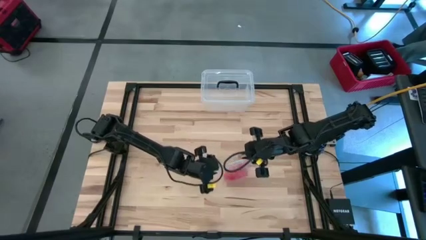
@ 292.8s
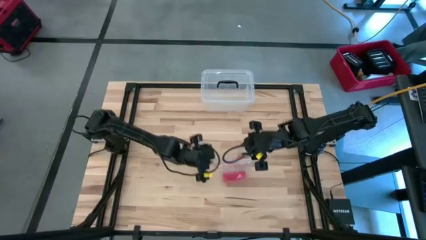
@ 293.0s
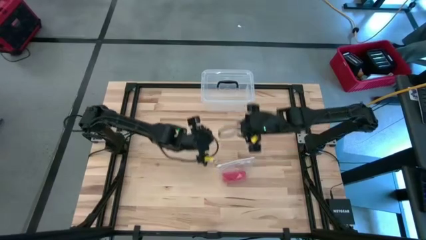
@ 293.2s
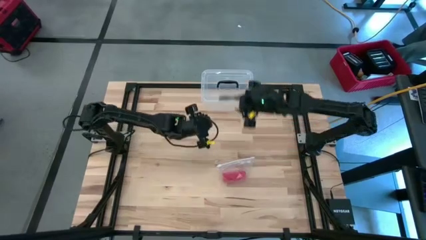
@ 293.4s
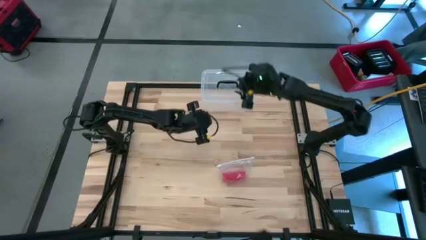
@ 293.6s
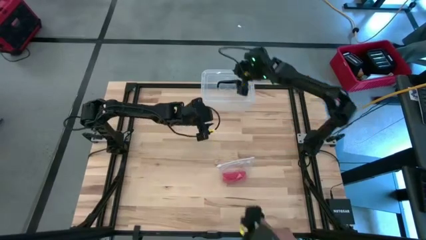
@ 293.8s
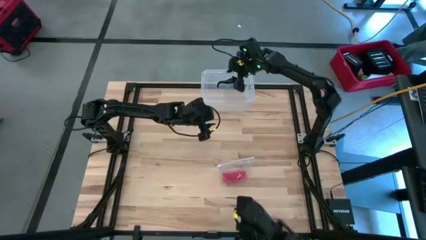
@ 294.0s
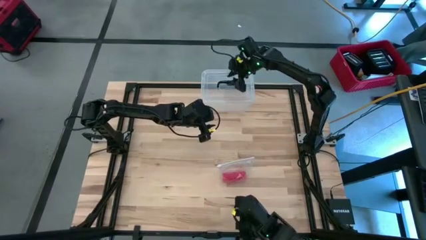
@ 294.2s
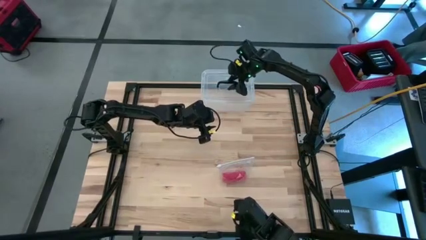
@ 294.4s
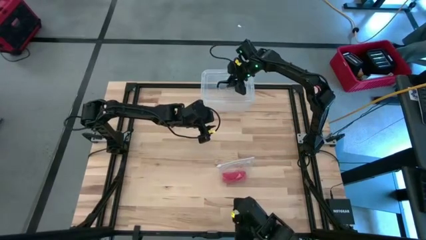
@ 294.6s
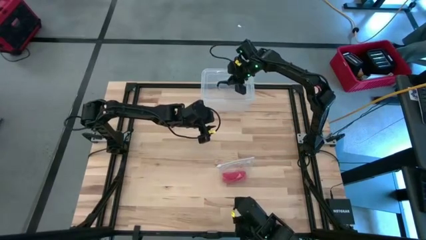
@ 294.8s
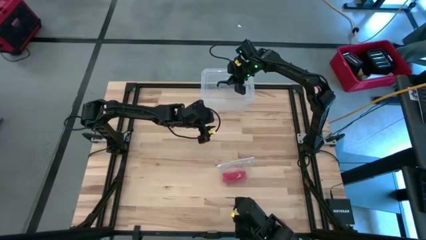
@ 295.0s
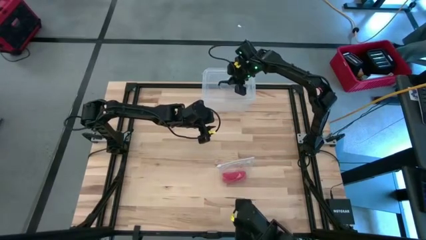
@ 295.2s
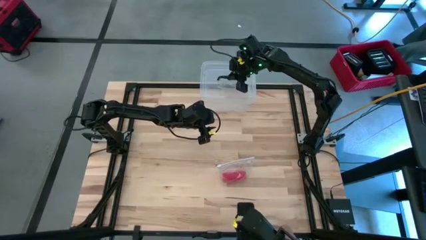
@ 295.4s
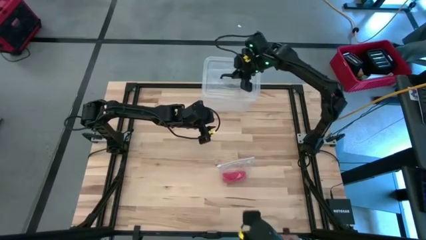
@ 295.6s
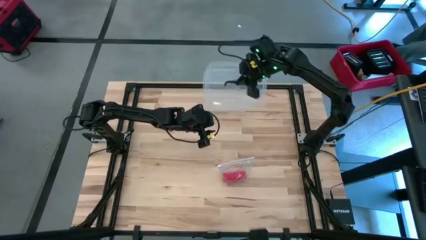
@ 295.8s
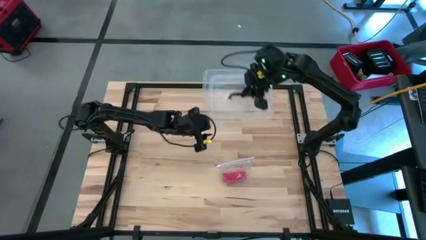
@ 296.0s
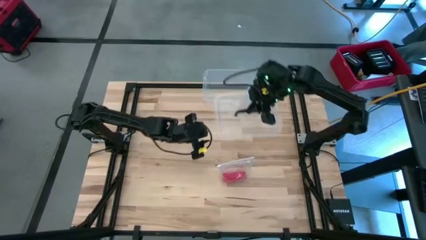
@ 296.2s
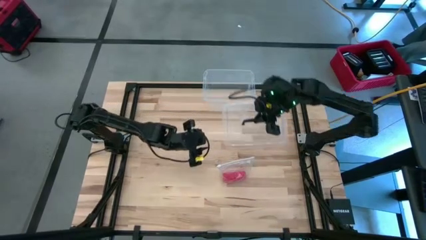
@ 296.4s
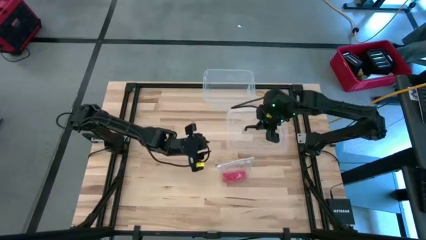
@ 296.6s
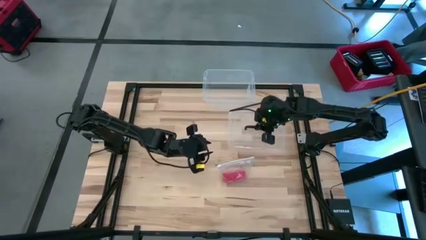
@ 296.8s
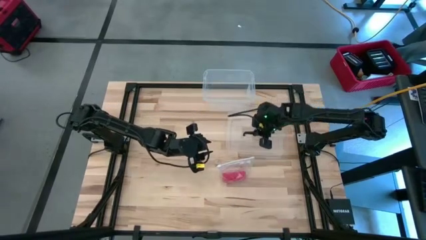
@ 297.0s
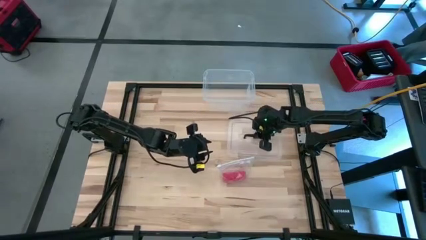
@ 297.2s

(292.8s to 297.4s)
Task: Roll bandage
Open the transparent bin

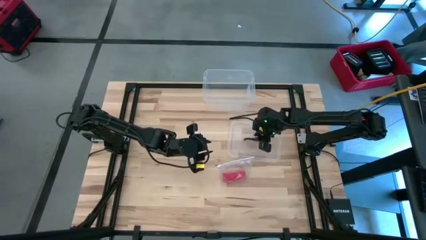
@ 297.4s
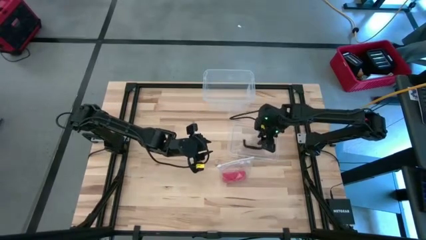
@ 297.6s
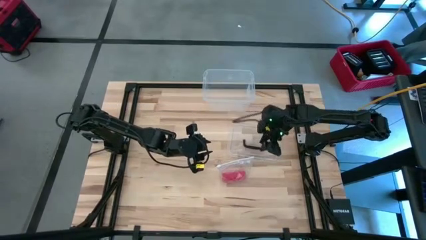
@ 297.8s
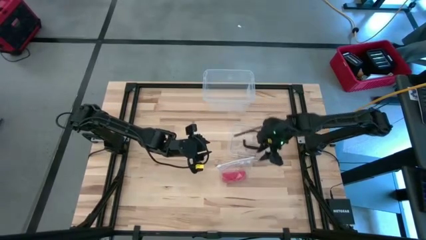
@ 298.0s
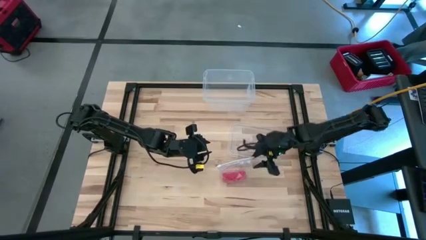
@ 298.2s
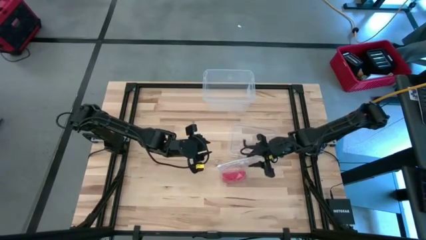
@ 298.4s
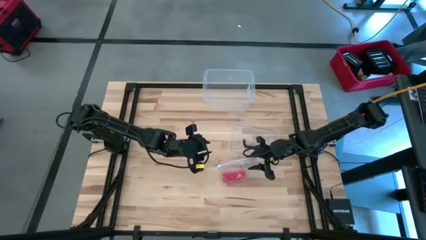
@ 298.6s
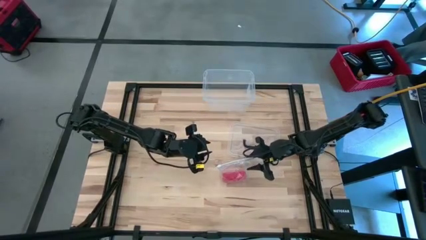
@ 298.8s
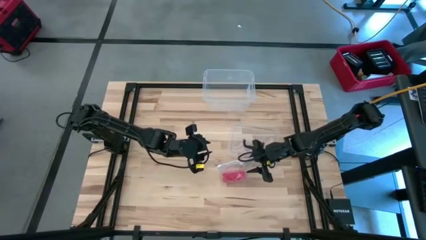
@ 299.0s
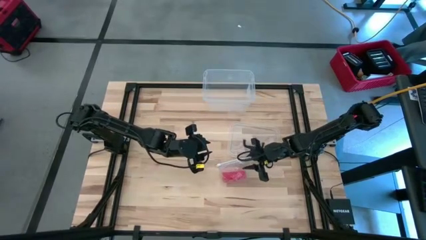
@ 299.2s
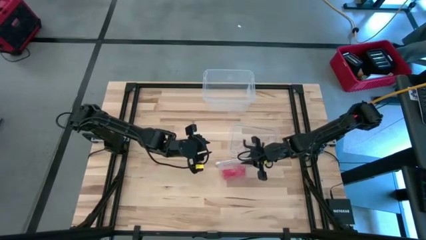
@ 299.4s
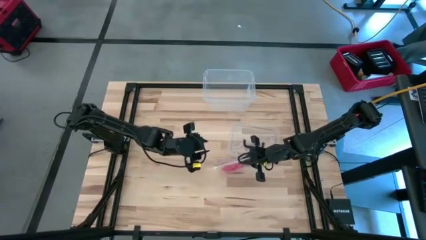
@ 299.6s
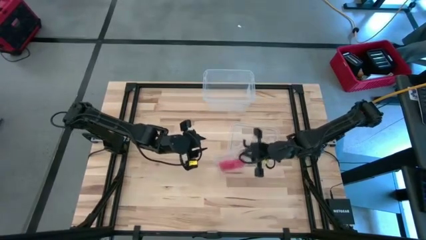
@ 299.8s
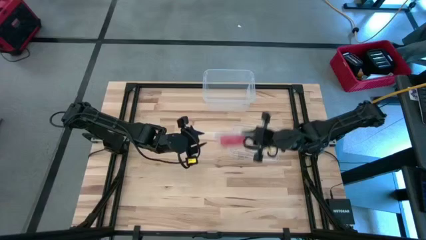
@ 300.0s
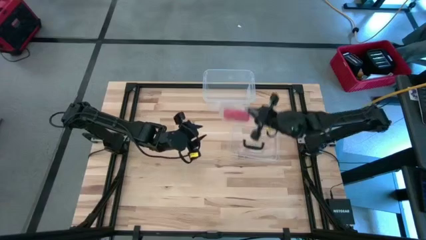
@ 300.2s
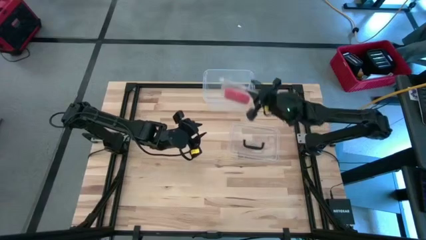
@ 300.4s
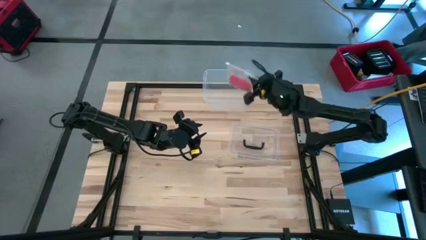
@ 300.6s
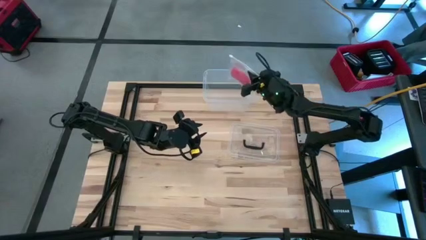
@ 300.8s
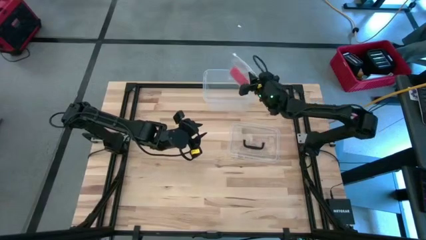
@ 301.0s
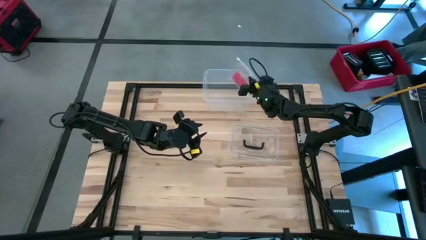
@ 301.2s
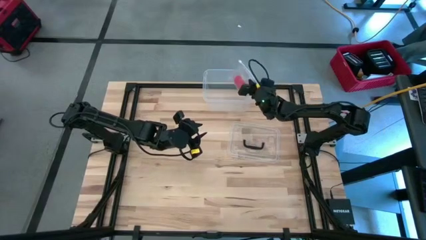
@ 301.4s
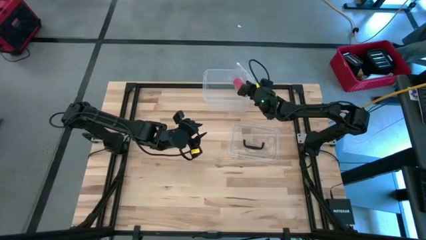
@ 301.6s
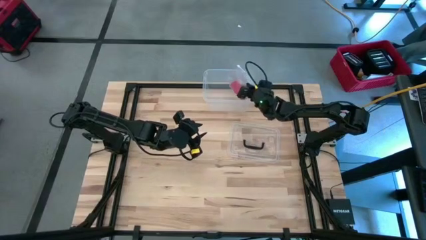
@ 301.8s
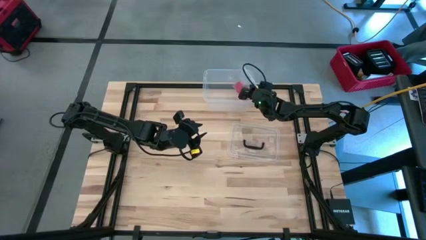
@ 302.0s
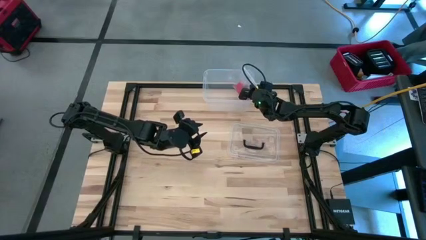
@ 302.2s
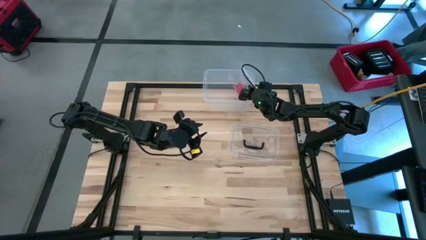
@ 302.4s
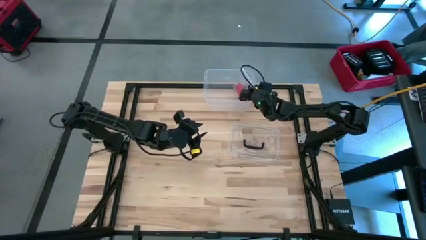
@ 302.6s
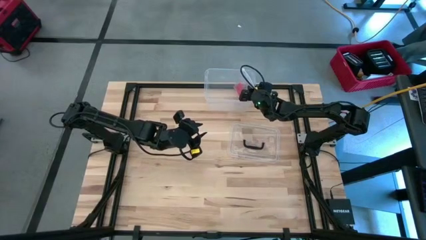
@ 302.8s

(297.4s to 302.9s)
Put the transparent zip bag into the transparent bin

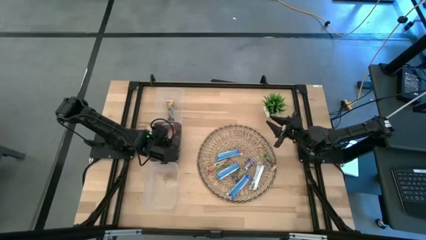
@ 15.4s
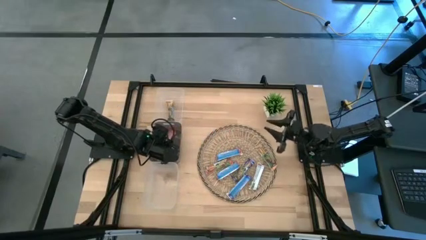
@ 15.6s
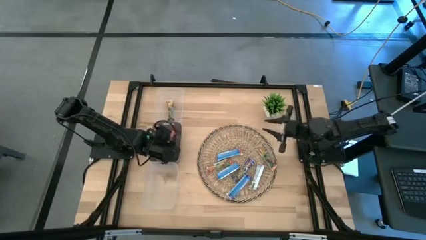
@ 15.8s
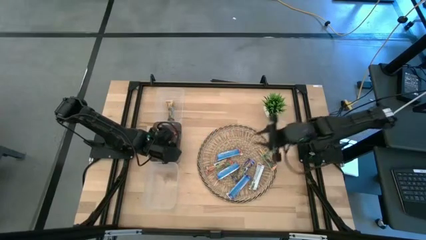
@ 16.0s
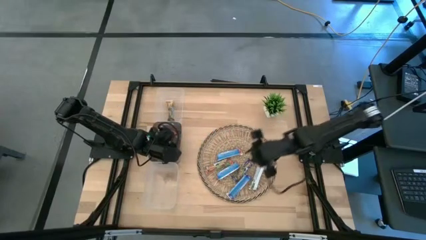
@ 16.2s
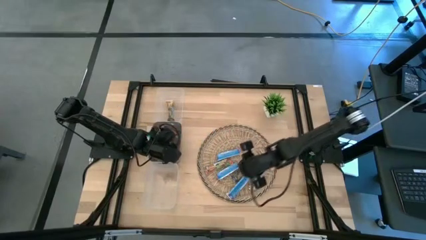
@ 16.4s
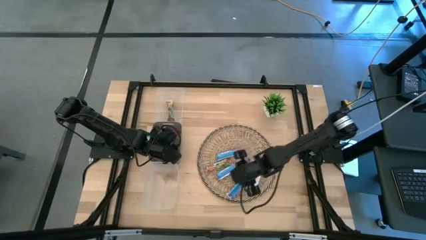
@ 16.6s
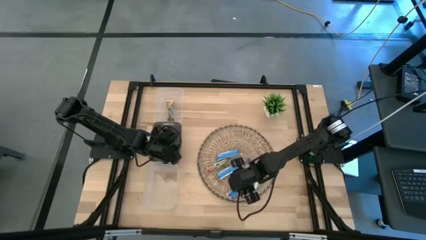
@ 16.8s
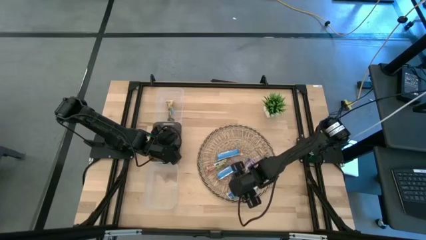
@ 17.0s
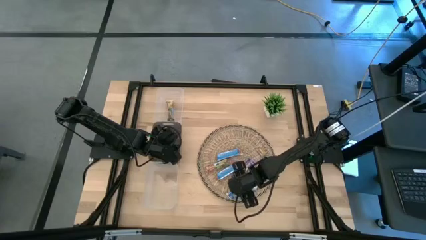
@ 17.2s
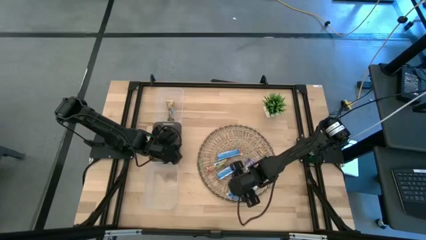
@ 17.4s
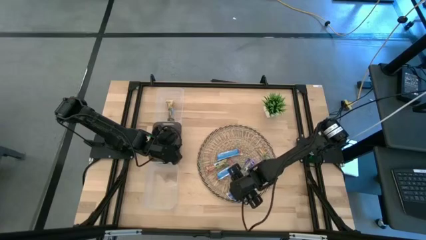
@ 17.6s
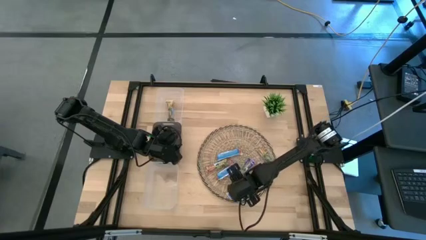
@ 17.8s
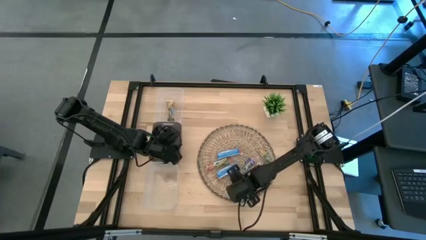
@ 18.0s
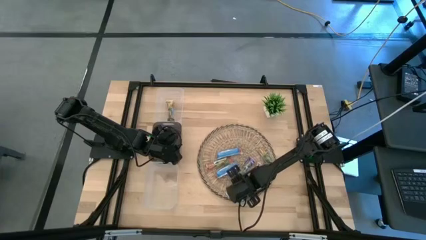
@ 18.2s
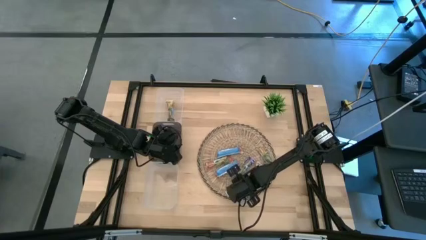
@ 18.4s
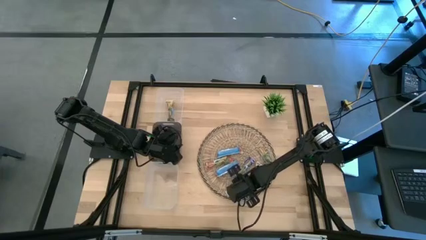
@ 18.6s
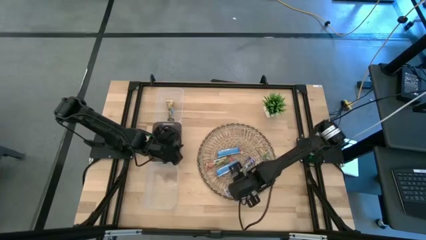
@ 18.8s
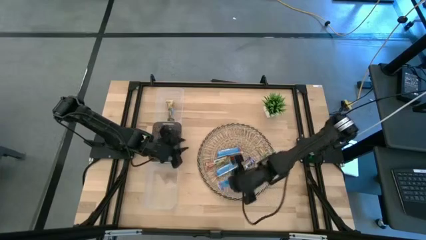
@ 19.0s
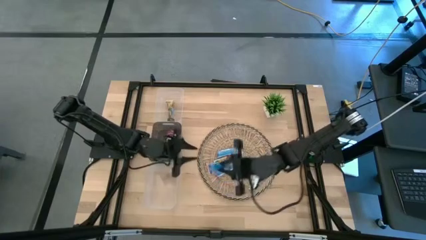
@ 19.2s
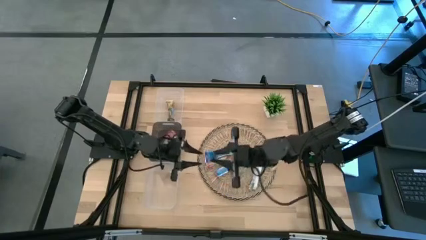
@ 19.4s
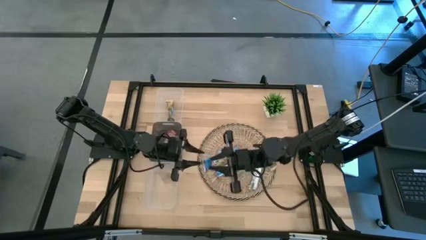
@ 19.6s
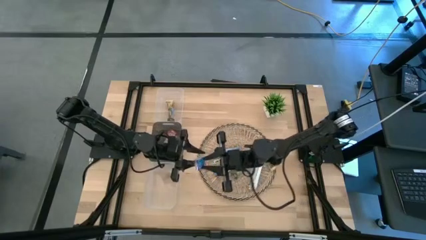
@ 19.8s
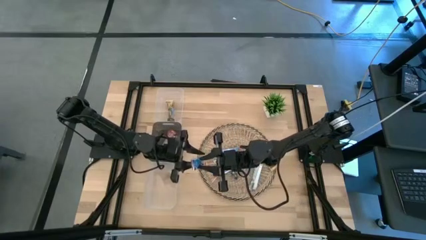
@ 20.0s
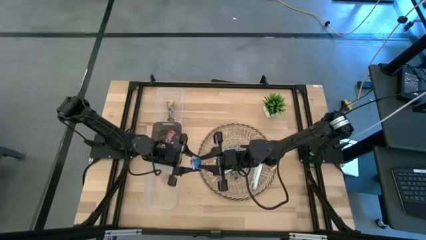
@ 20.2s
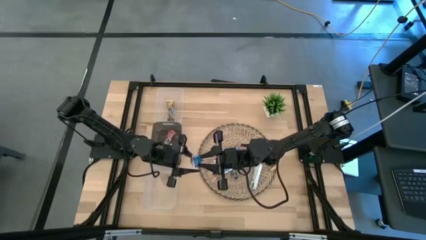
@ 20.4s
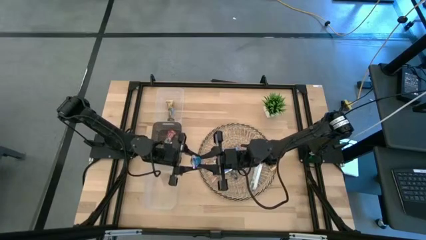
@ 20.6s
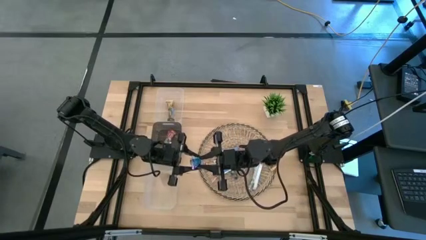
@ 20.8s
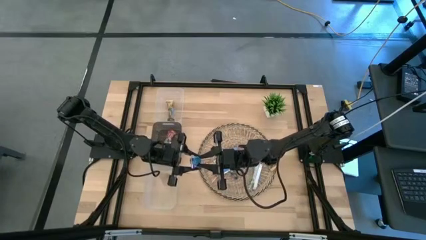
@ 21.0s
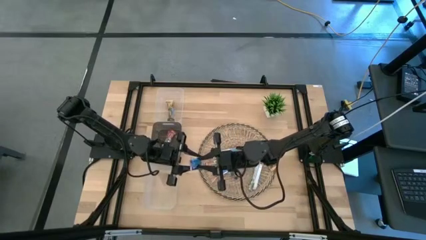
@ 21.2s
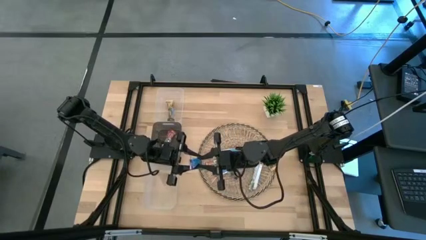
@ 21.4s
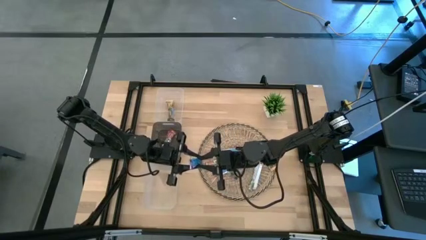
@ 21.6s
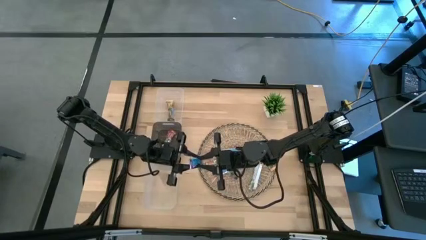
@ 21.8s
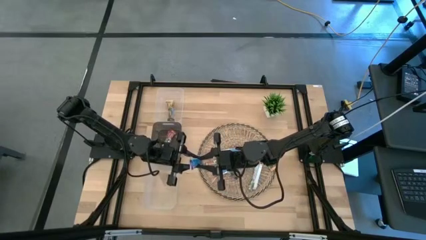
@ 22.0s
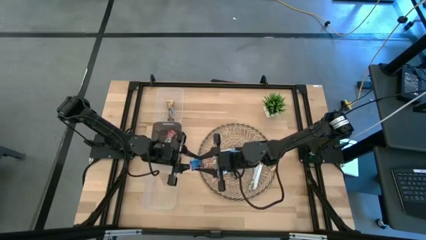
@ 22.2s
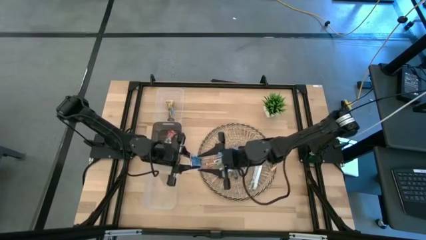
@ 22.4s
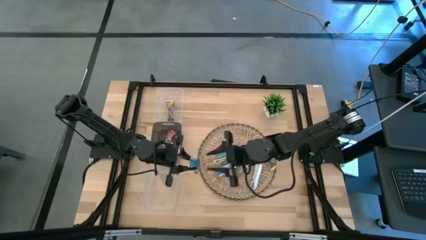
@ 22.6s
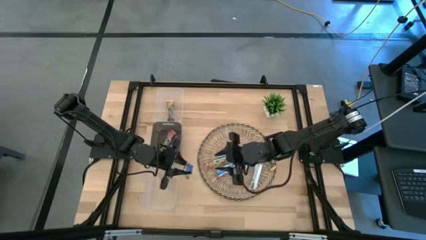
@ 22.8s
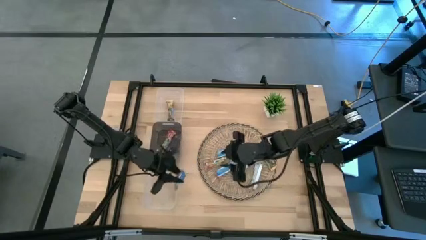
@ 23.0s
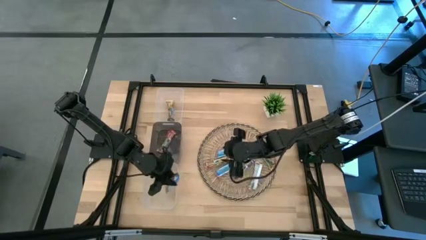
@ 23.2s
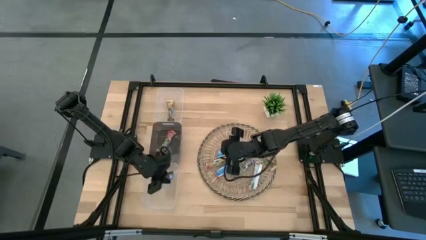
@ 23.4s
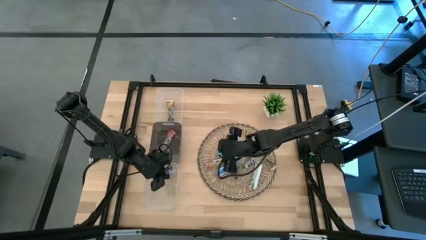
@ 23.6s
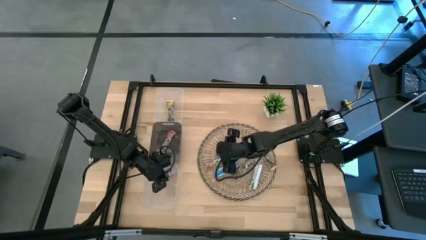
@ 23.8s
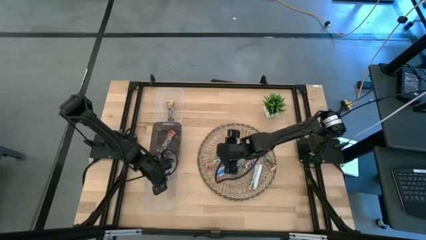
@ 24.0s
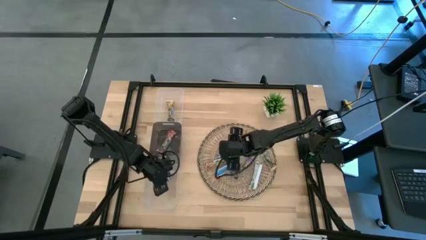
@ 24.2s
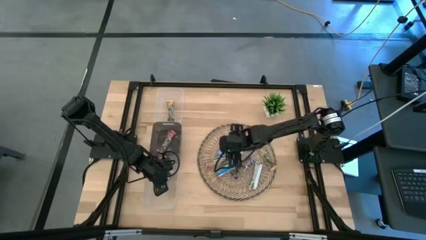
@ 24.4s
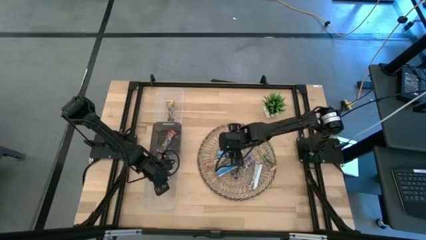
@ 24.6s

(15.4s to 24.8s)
Task: Pick and place Granola Bars by type
Put the blue granola bar into the bottom transparent bin
